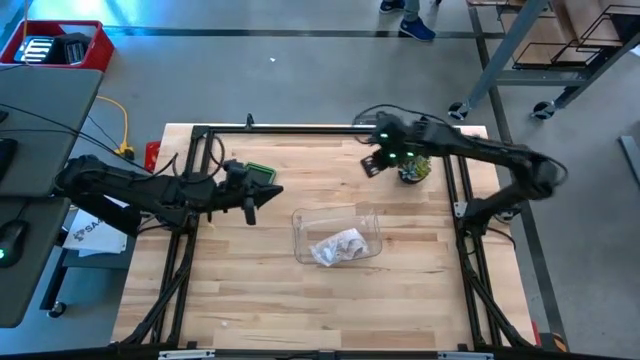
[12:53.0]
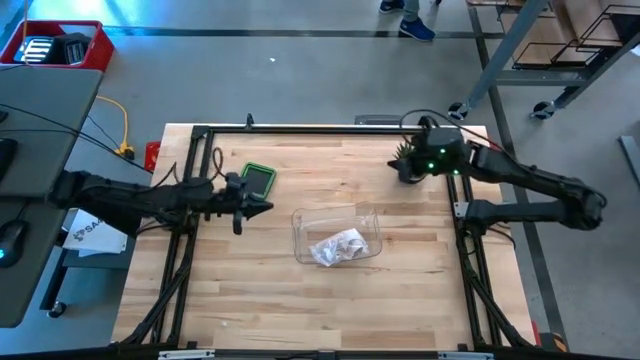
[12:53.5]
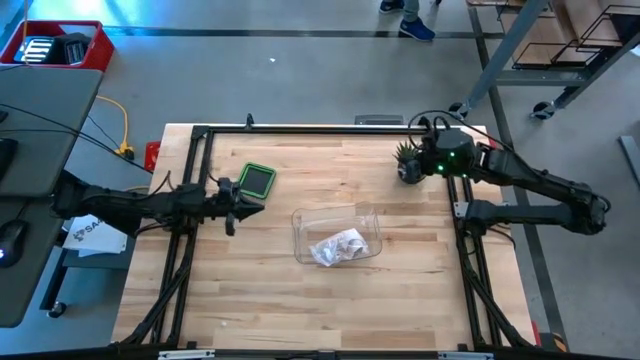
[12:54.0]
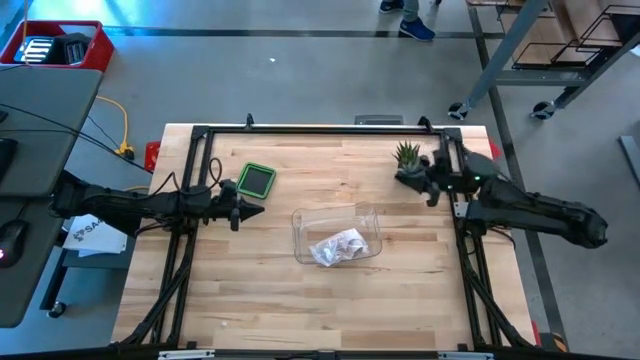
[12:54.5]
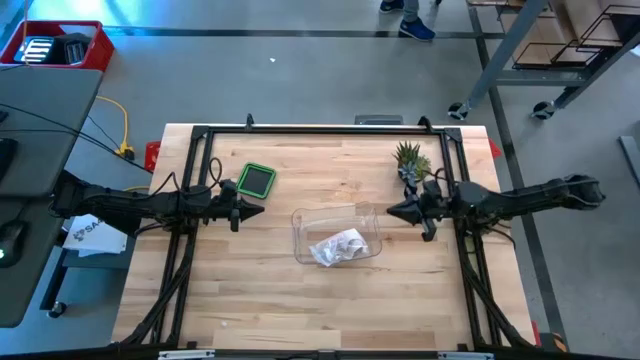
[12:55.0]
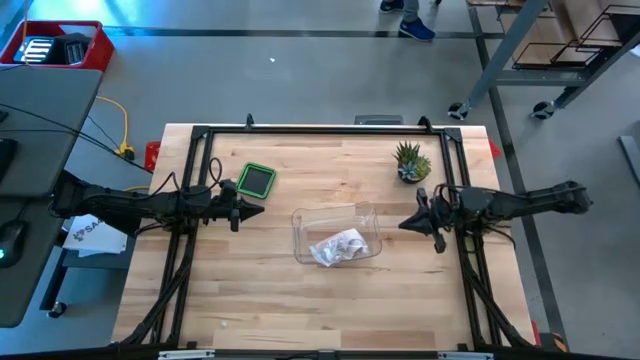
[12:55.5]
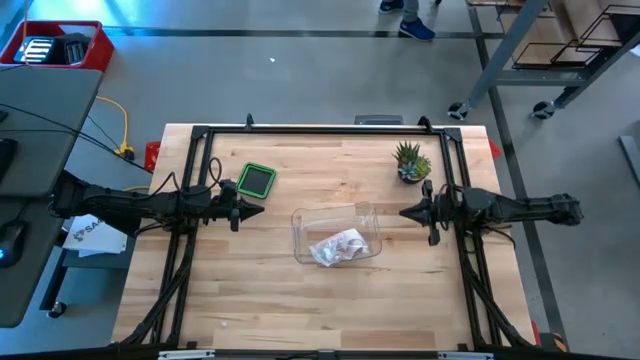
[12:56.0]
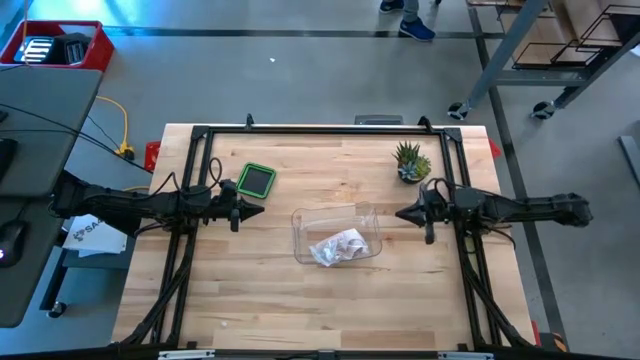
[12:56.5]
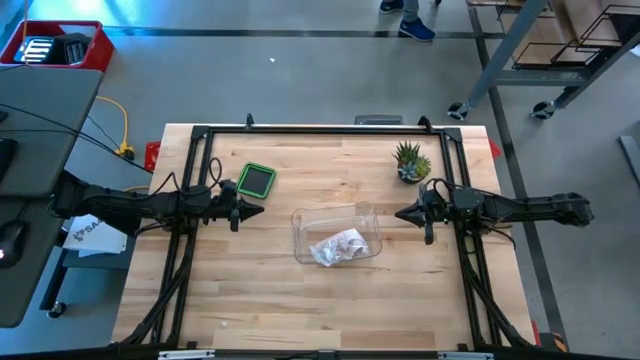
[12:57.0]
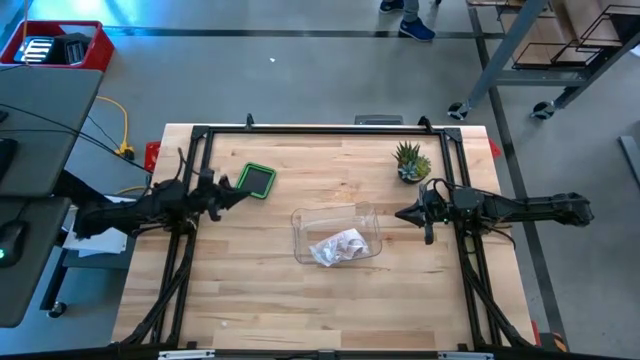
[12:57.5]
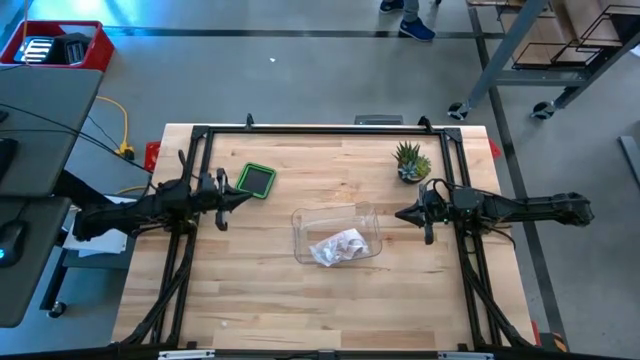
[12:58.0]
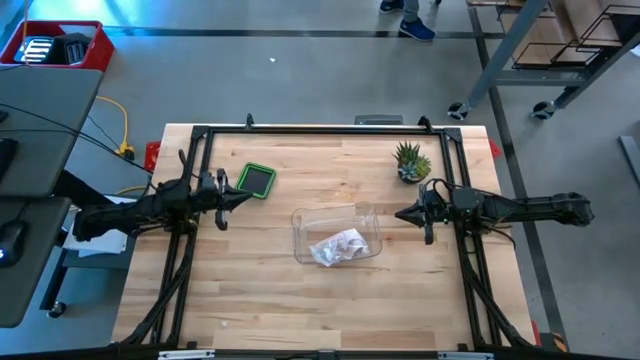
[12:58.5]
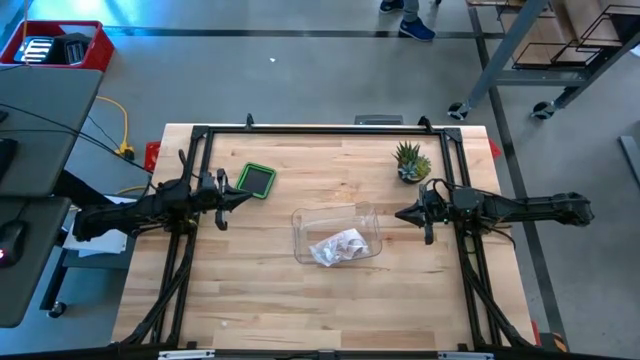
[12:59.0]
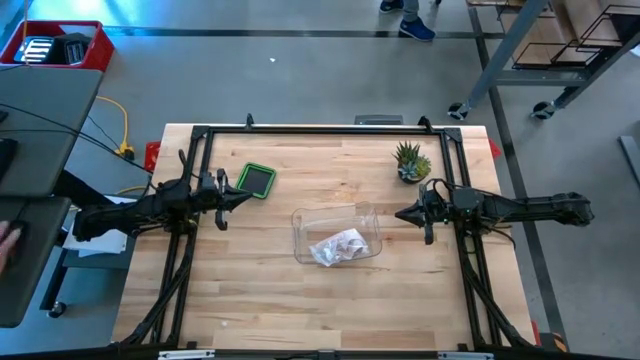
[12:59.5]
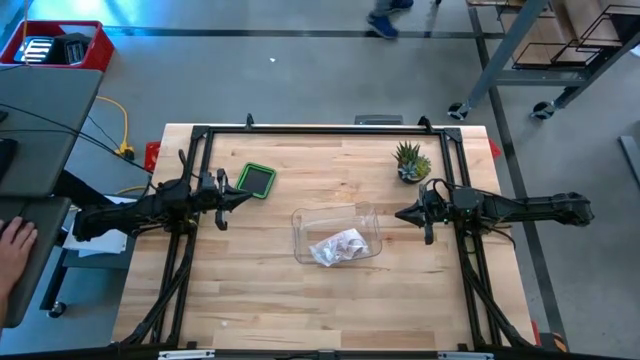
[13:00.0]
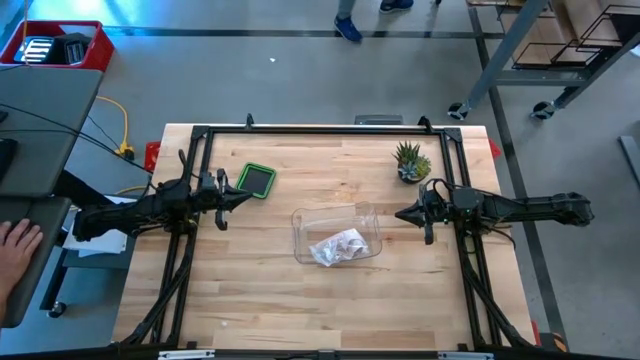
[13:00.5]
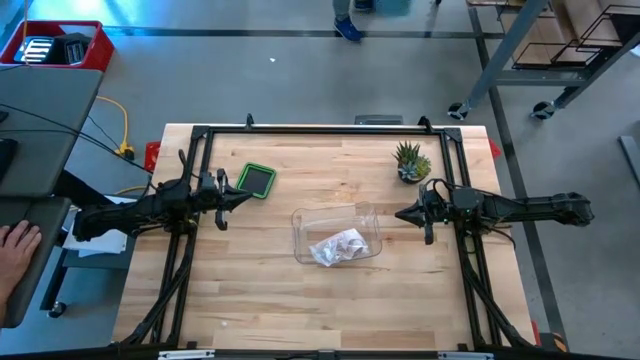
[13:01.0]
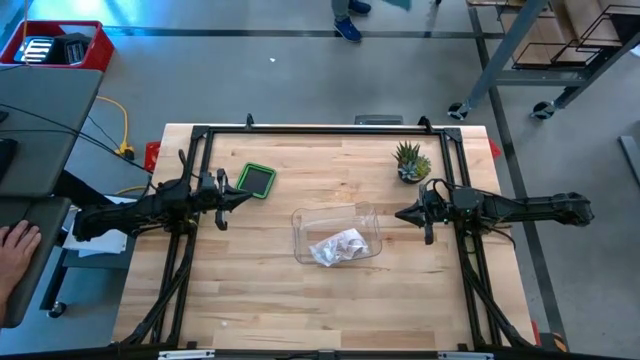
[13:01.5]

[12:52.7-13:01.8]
Task: Roll bandage
Return to Home Position

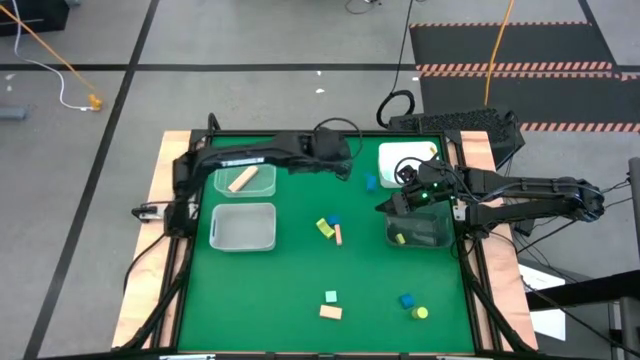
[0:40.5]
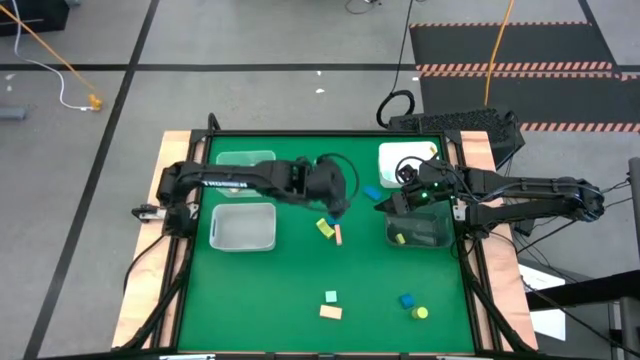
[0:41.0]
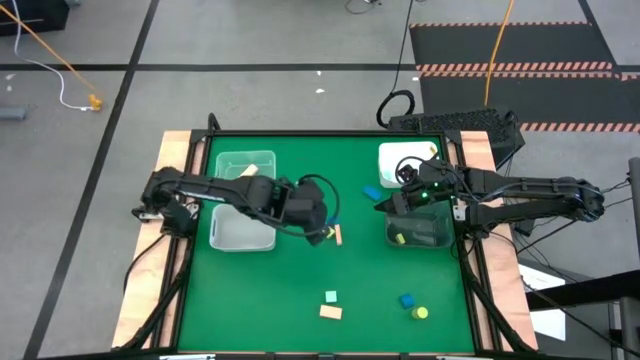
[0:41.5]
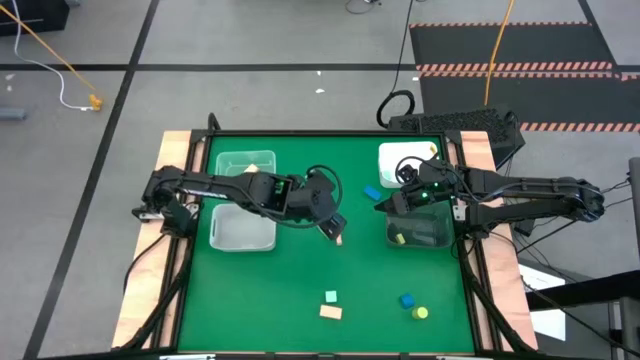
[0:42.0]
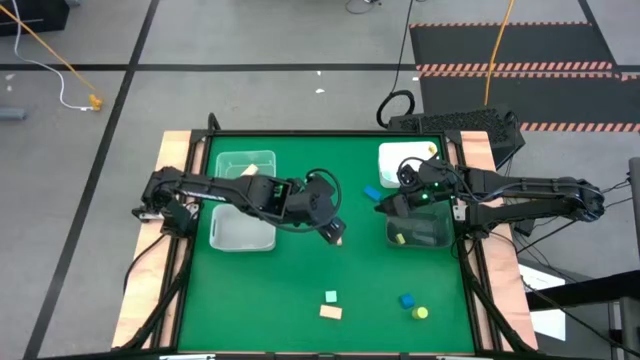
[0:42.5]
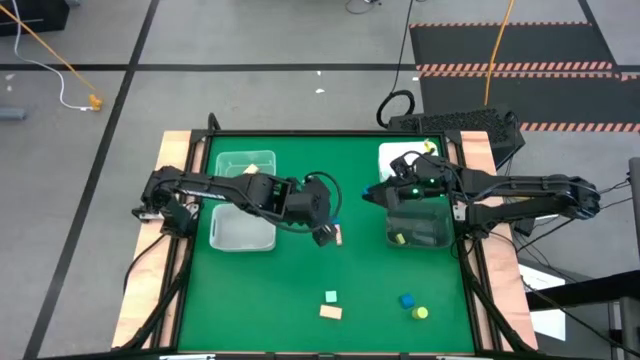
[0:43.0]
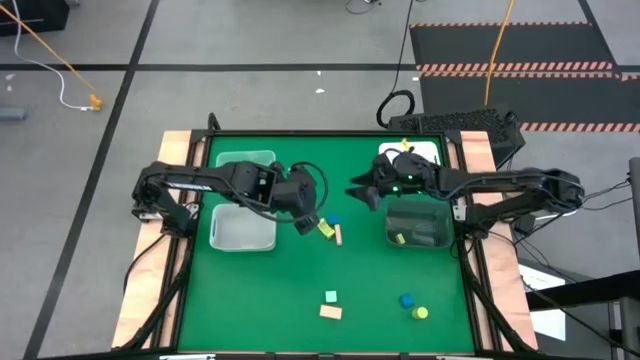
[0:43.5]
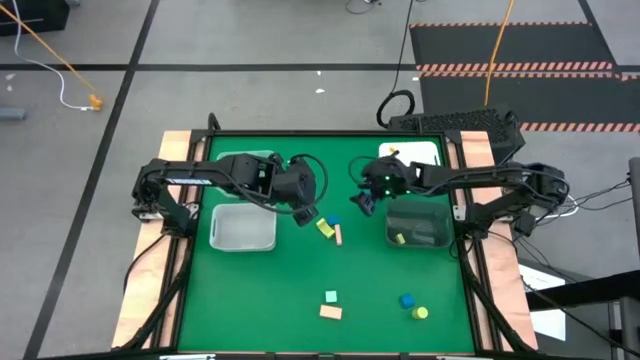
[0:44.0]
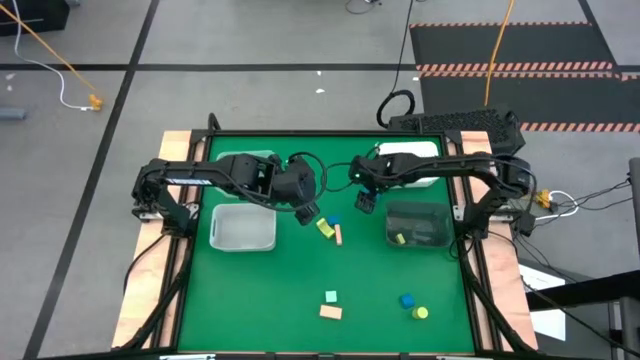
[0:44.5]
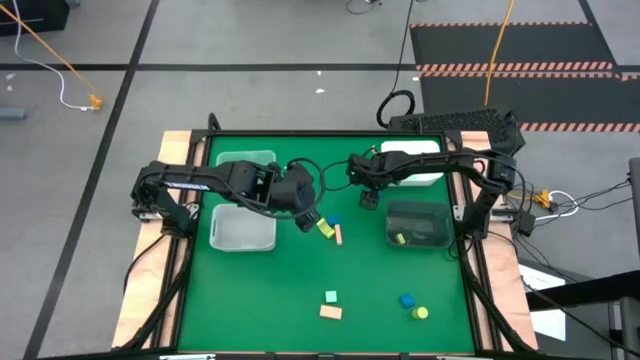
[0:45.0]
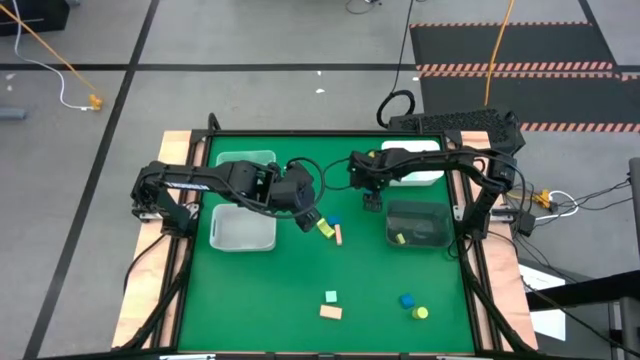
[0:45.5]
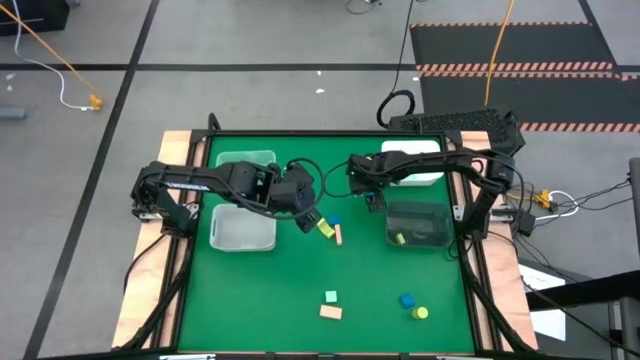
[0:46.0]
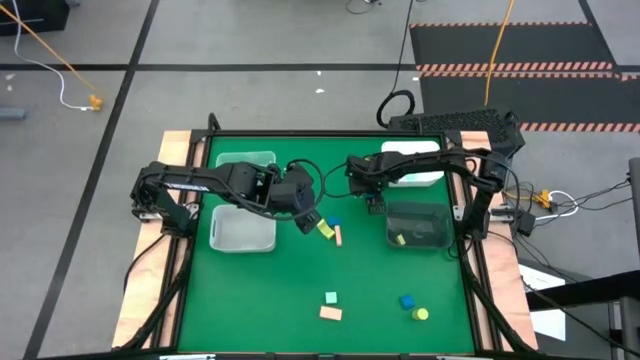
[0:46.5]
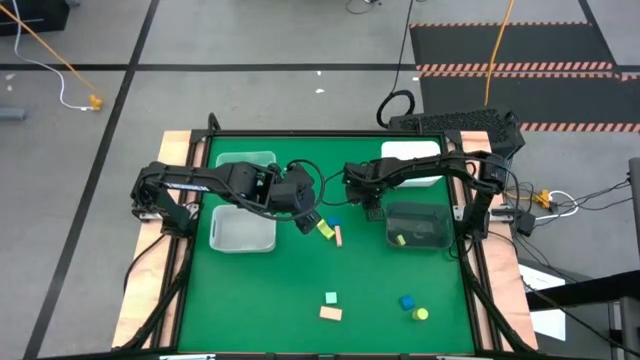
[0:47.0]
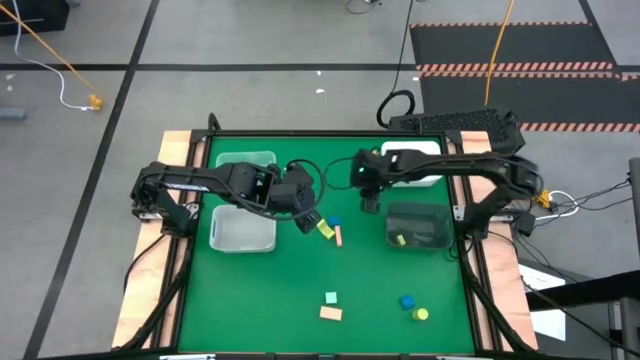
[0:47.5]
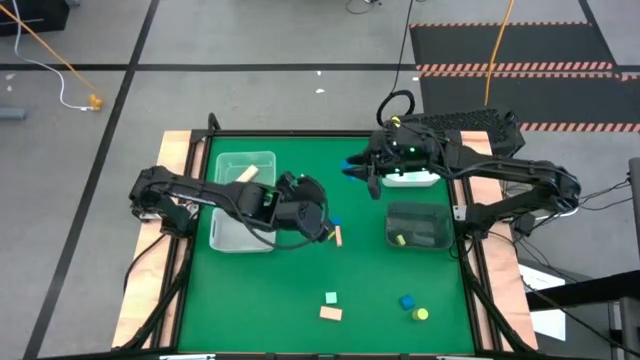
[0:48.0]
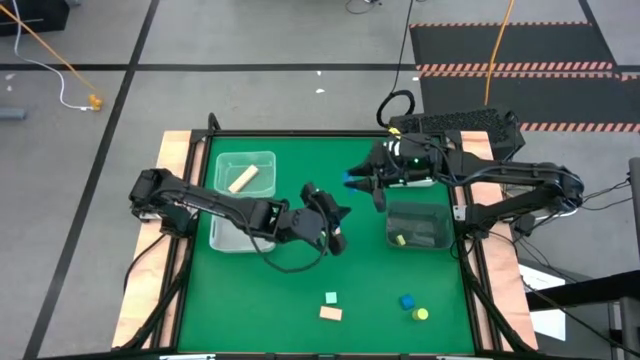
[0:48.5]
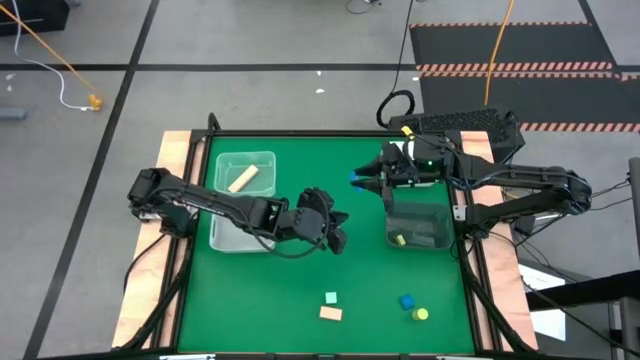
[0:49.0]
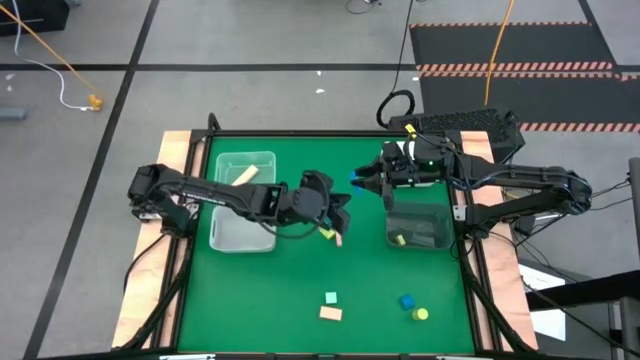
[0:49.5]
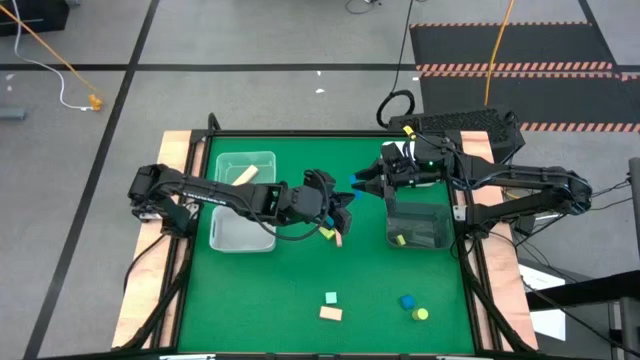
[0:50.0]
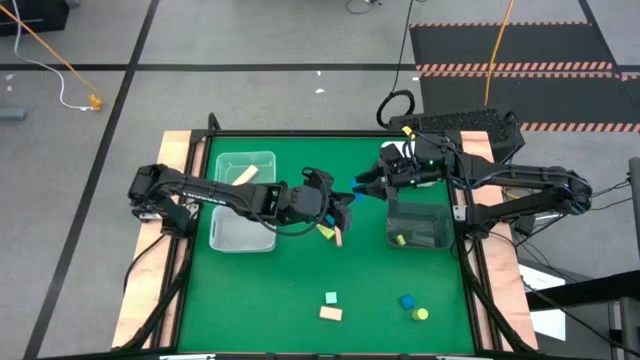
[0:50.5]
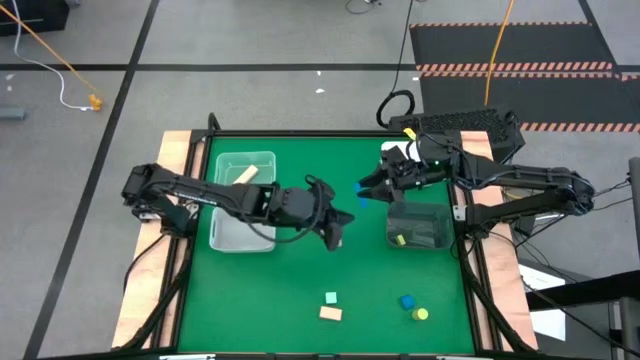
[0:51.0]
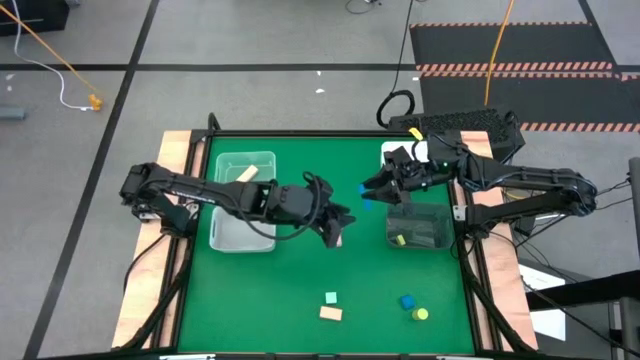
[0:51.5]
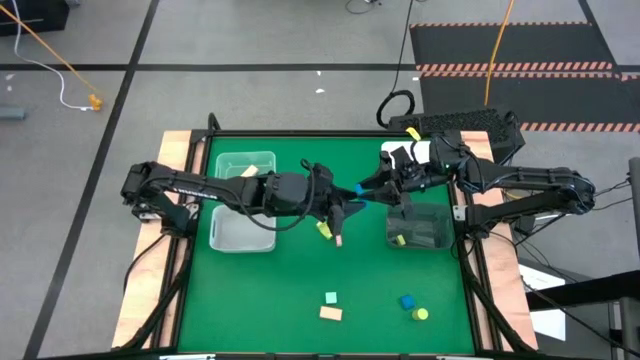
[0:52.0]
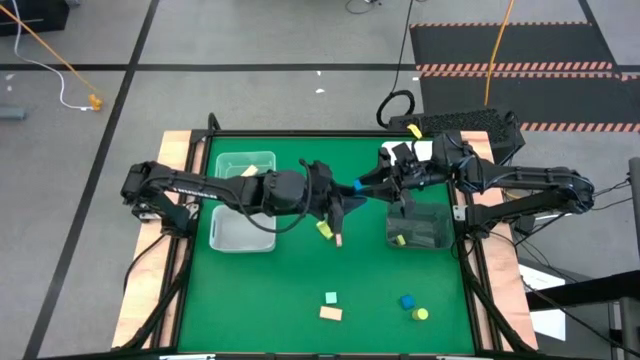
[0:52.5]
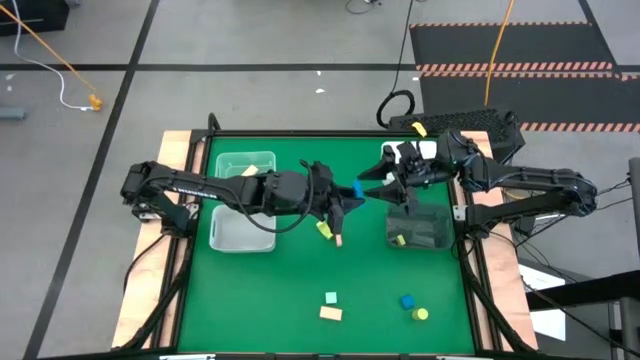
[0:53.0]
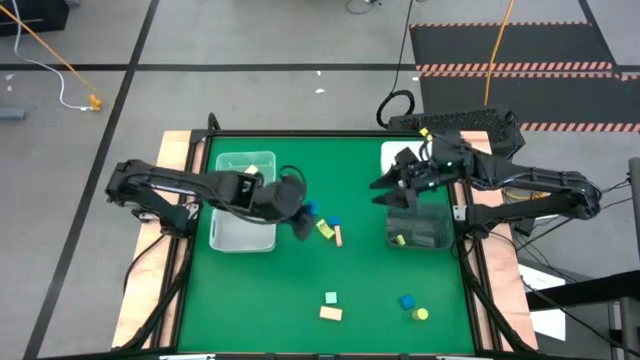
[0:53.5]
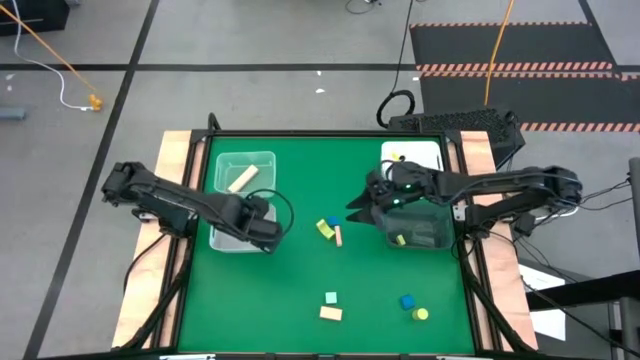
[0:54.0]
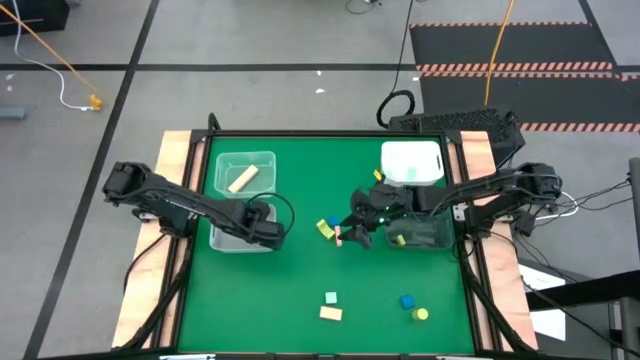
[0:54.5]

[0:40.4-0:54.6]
Task: Sort & place blocks by color
Put the top blue block into the gray bin
